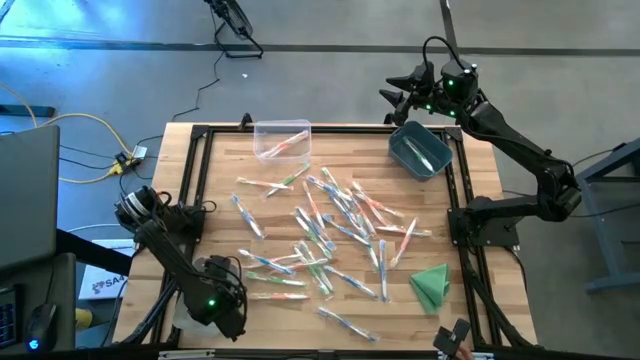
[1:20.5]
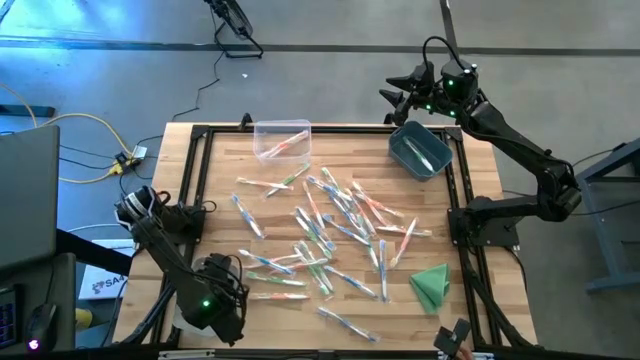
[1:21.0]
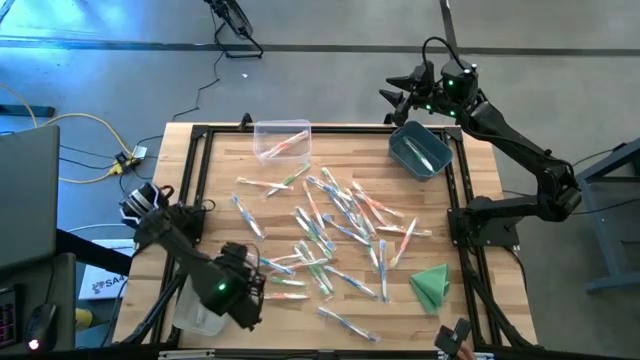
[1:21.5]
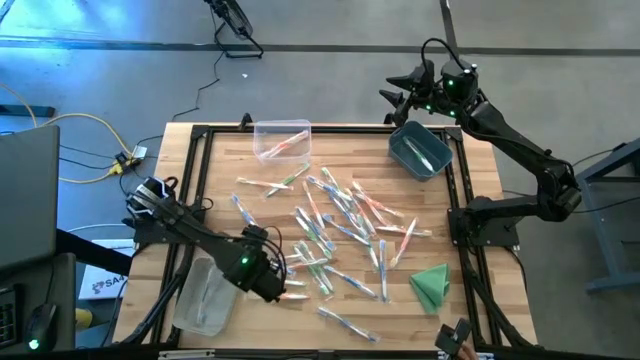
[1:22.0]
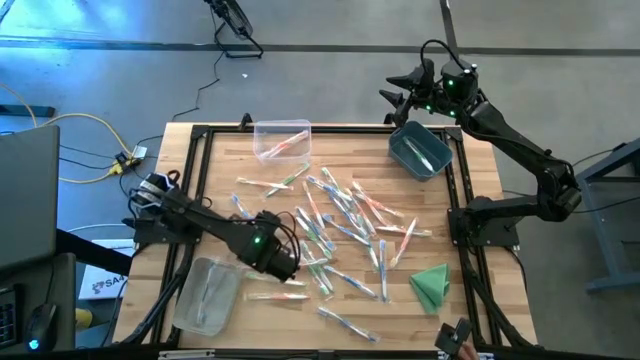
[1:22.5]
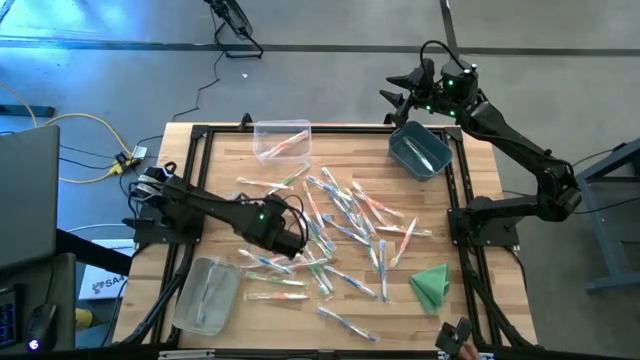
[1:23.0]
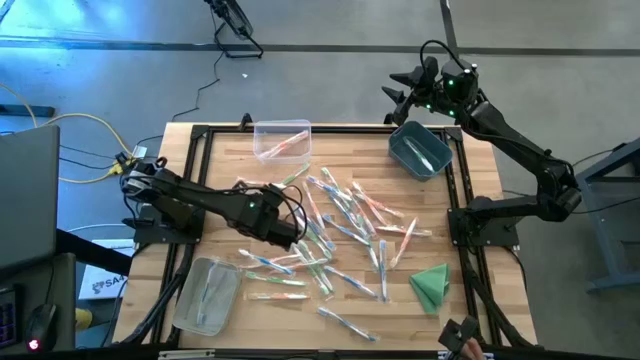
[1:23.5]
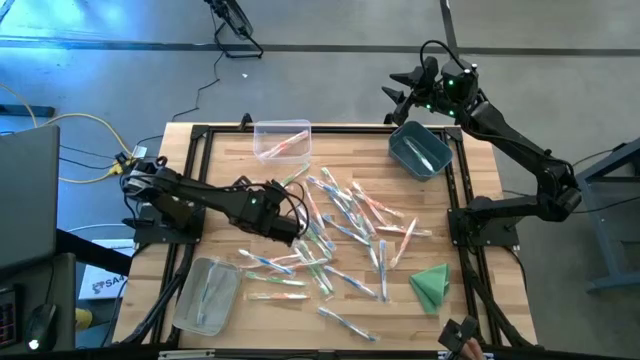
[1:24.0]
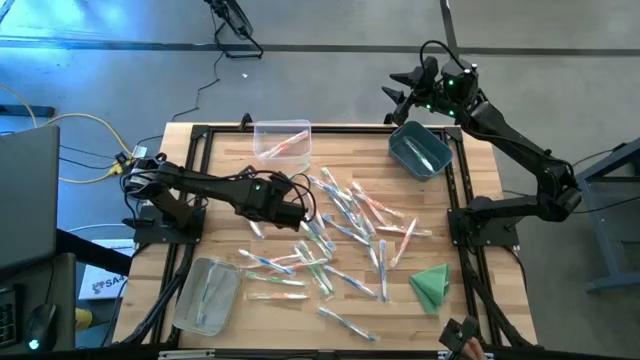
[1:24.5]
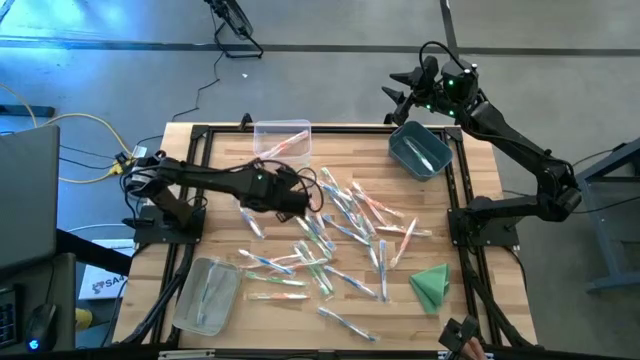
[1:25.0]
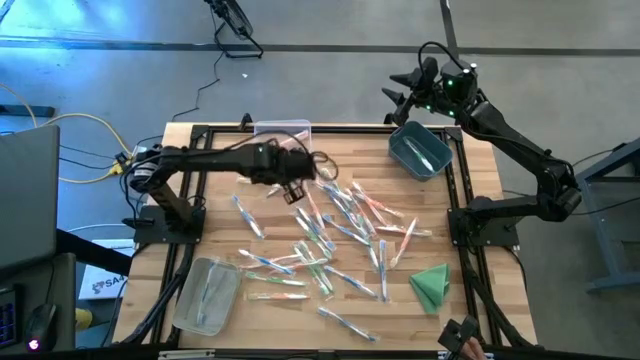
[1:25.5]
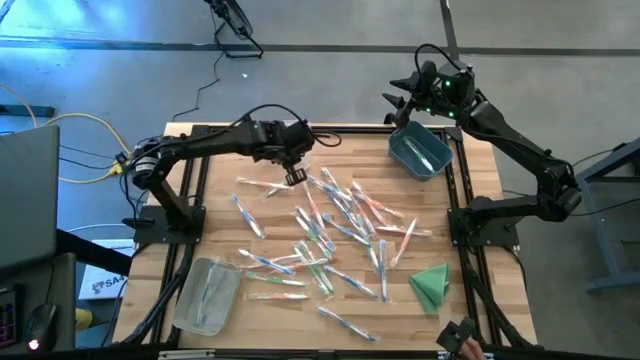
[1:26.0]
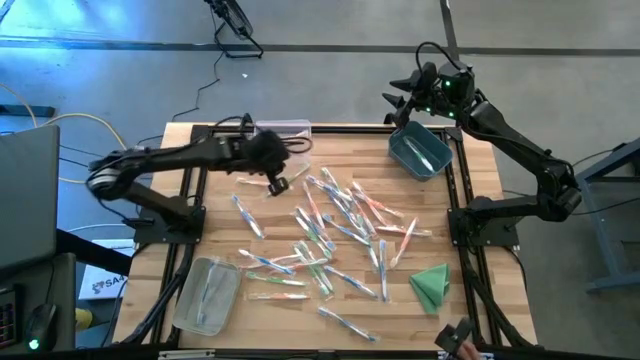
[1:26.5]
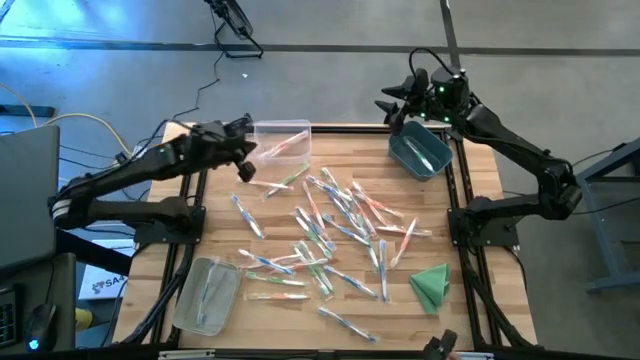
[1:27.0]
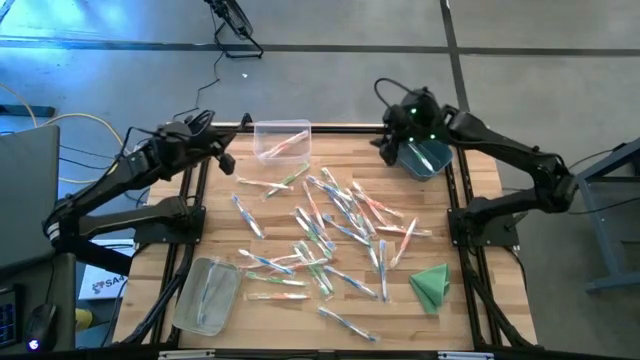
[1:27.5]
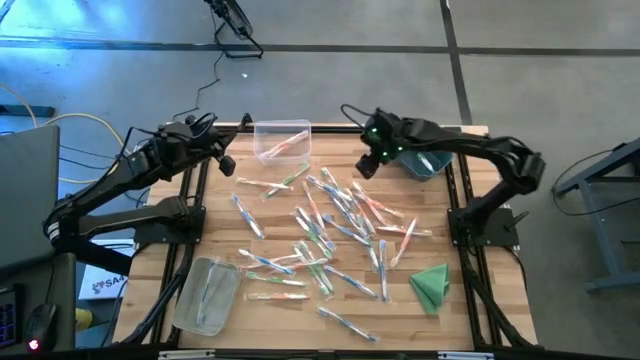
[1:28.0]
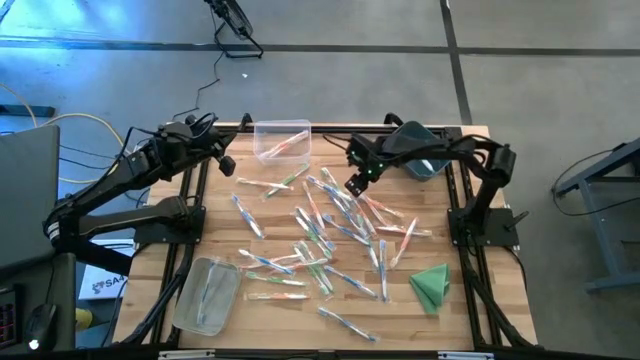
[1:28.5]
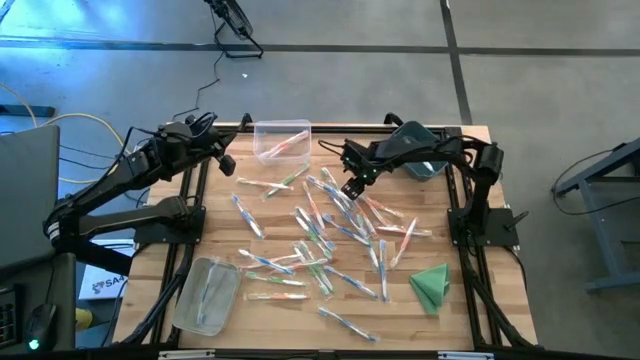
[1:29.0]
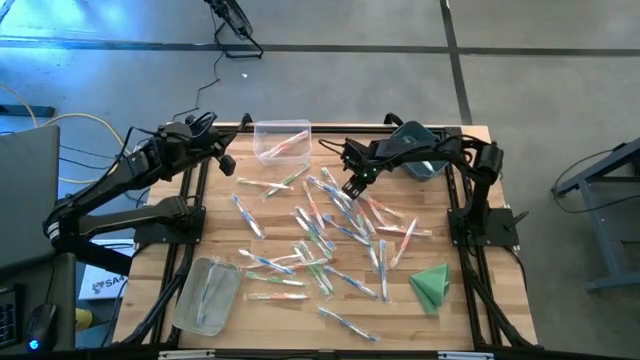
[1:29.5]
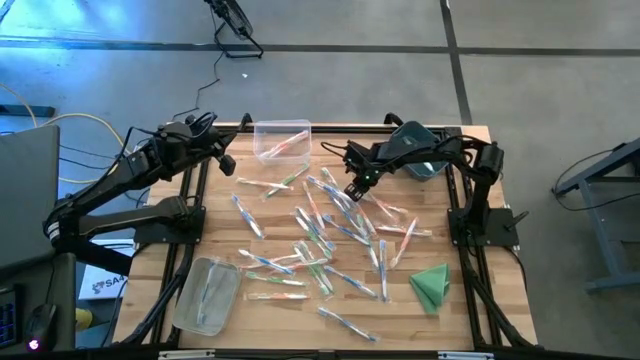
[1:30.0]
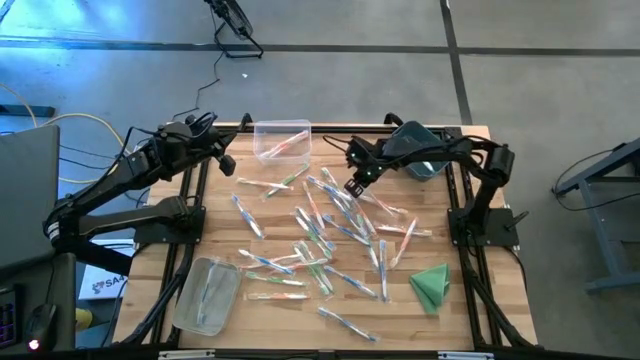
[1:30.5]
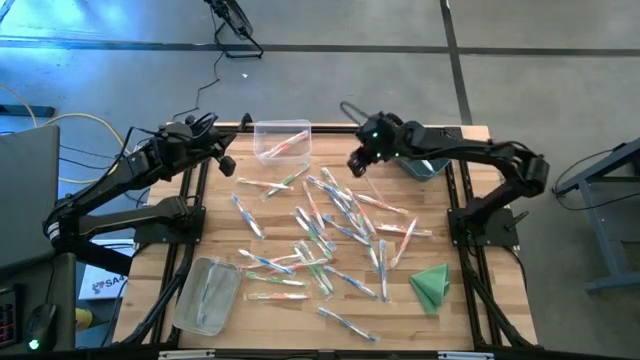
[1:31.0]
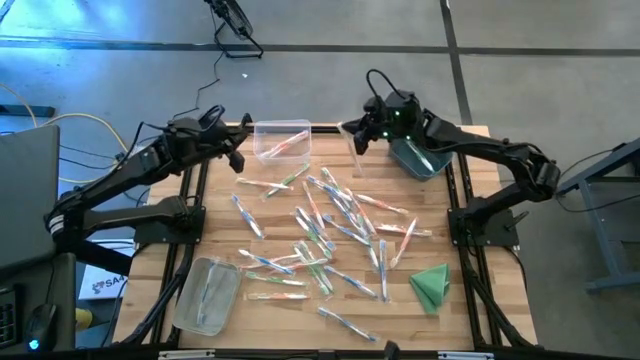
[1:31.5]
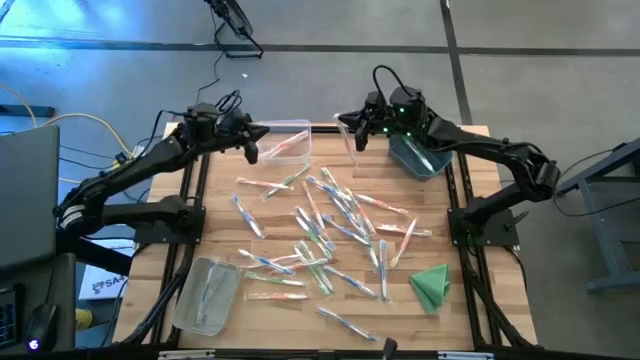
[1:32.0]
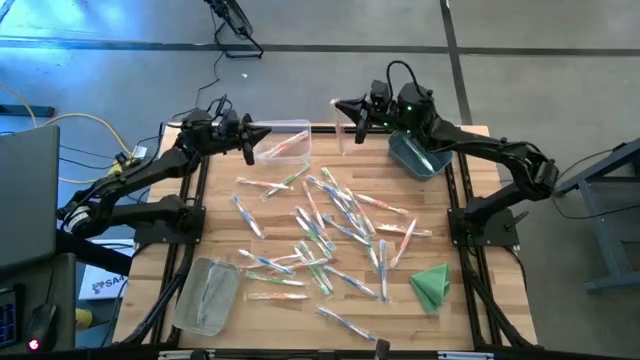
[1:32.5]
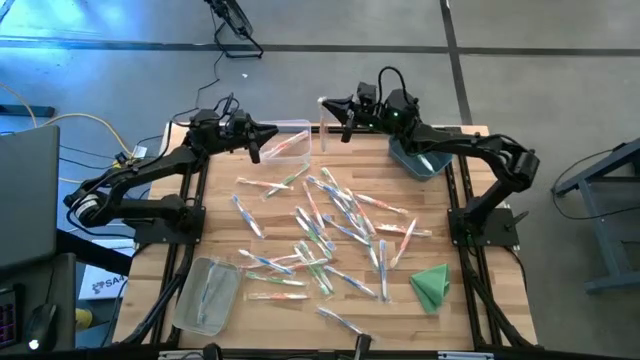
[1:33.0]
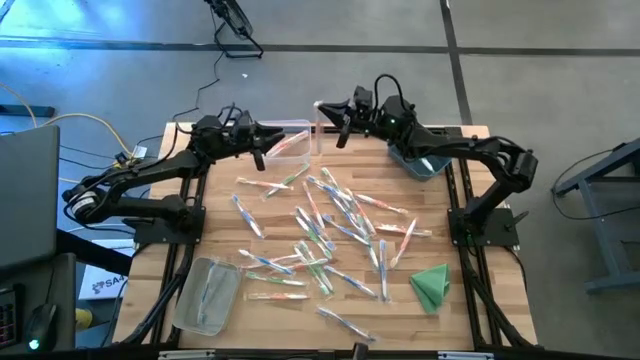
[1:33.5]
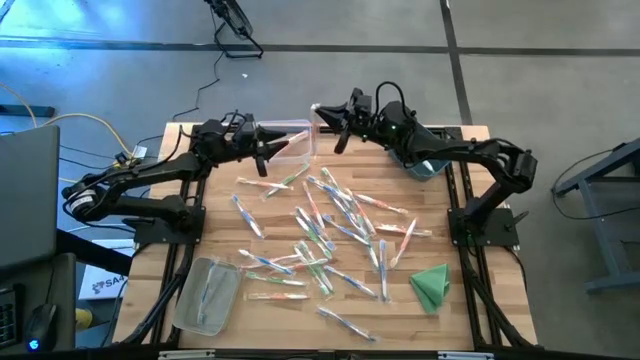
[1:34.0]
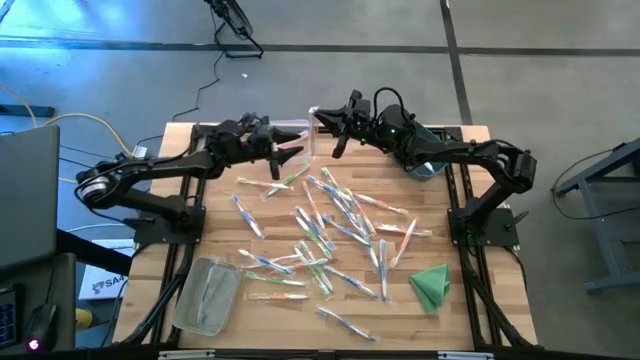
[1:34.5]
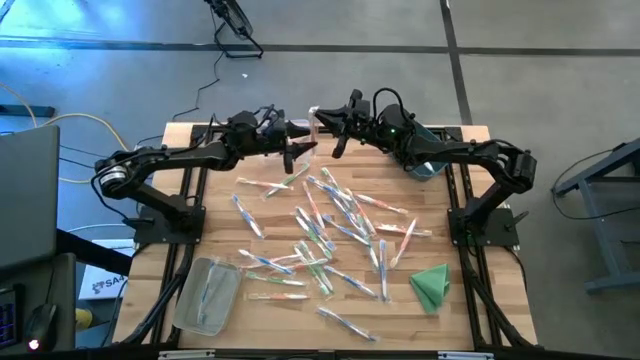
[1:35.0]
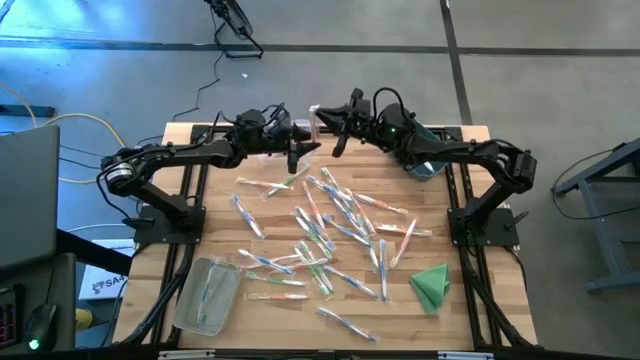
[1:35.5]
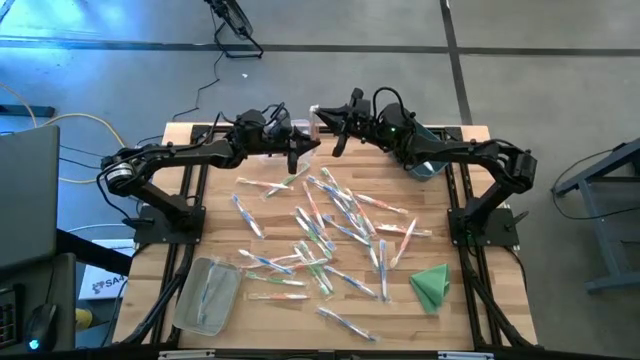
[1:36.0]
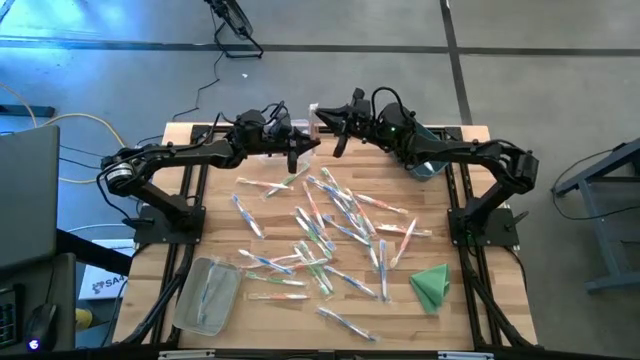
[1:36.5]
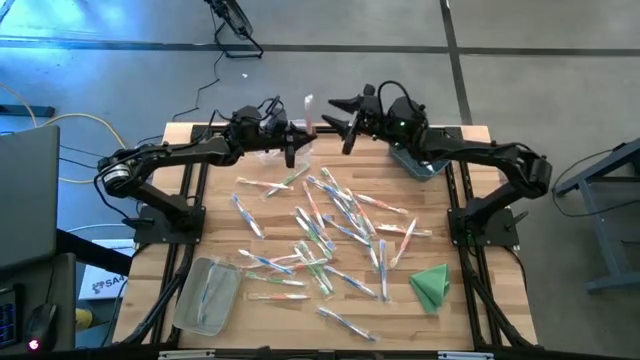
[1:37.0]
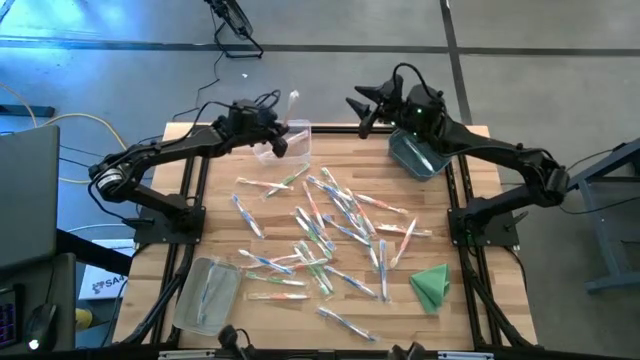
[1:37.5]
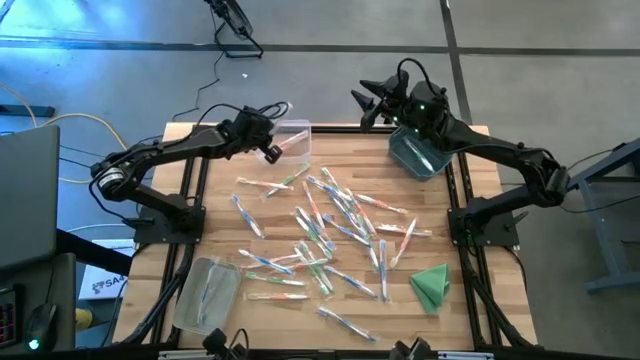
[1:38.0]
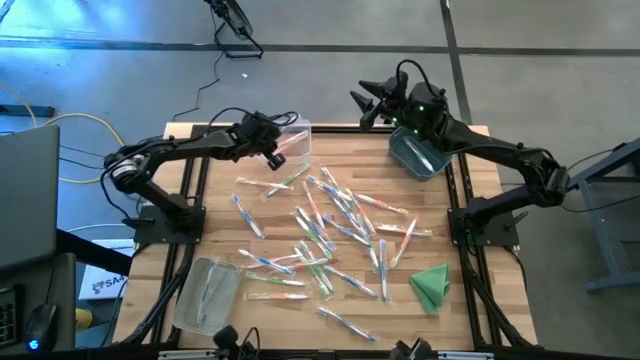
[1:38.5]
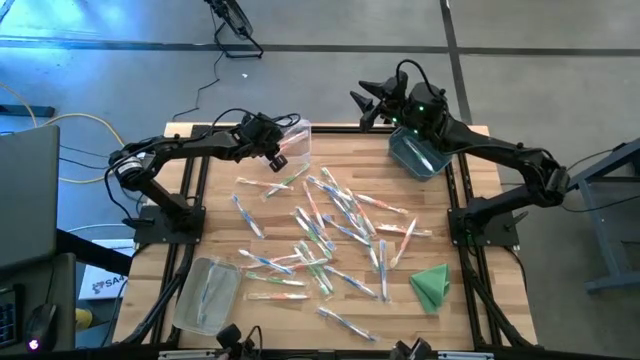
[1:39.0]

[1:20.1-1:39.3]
Task: Pick & Place Toothbrushes
Put the orange toothbrush into the transparent bin
